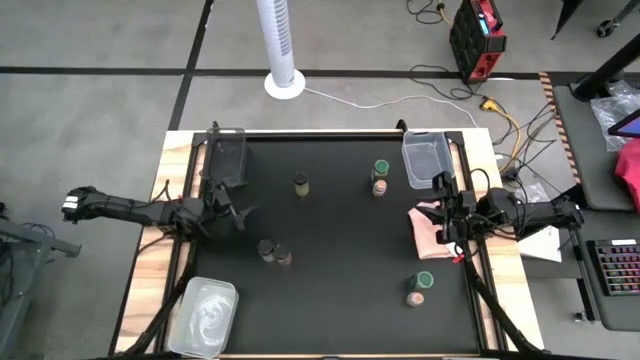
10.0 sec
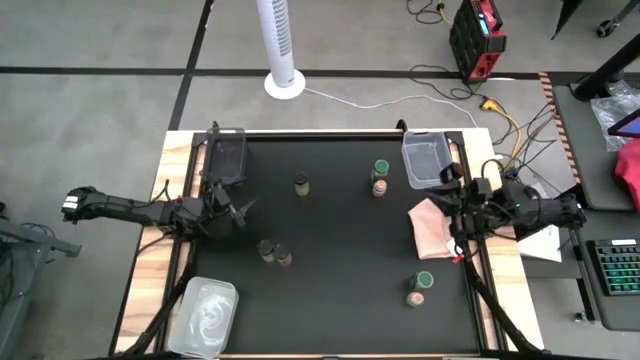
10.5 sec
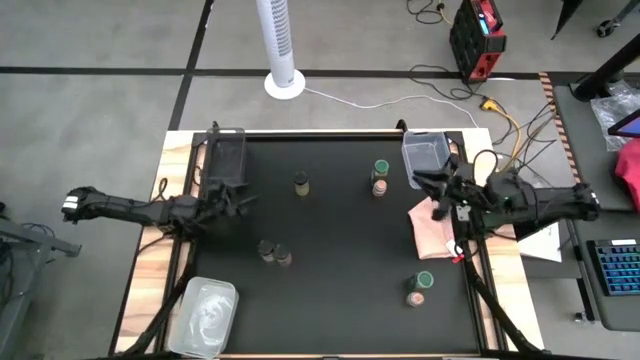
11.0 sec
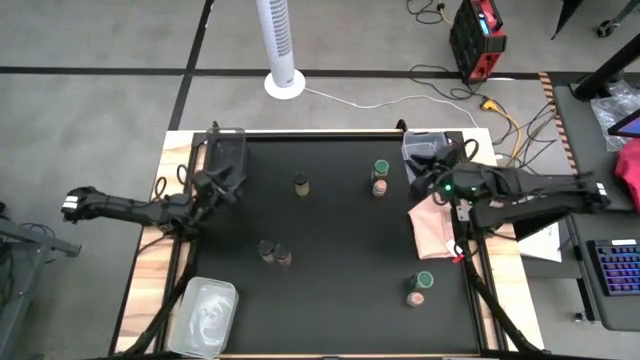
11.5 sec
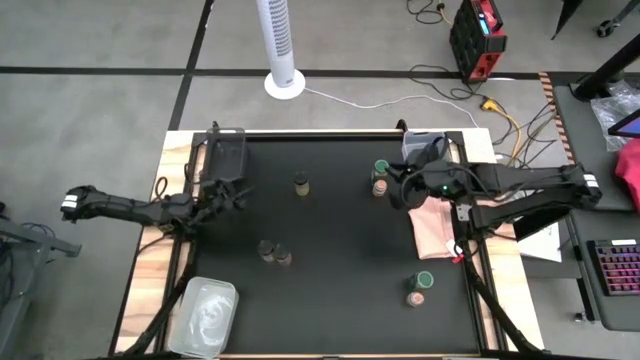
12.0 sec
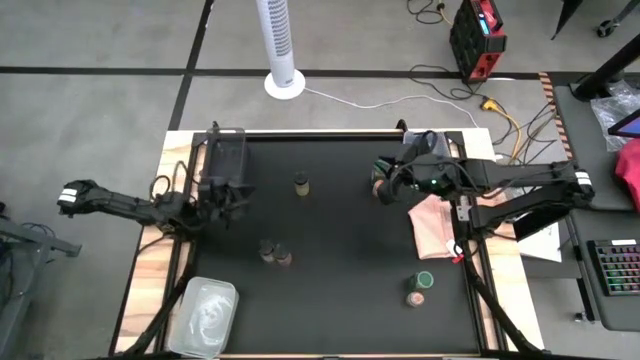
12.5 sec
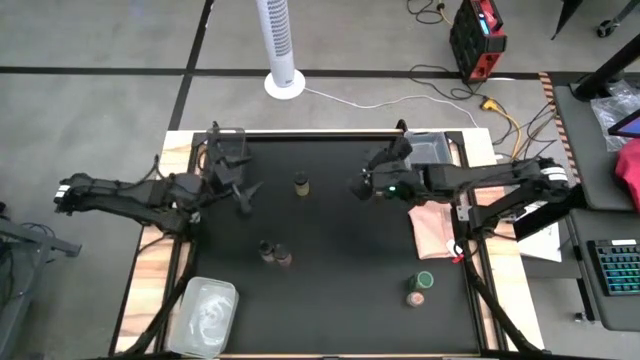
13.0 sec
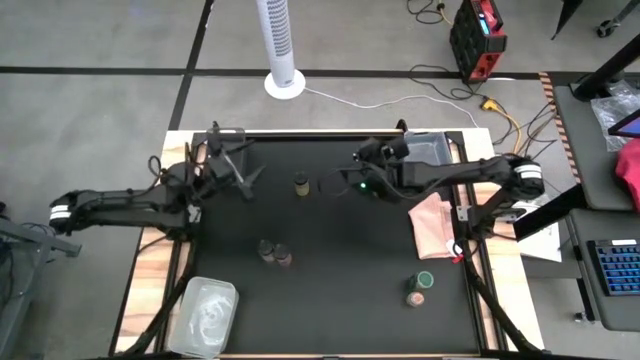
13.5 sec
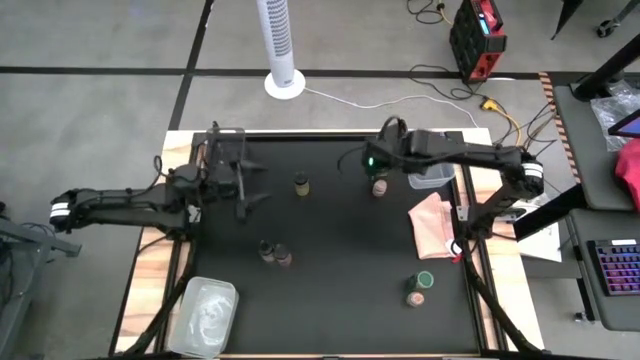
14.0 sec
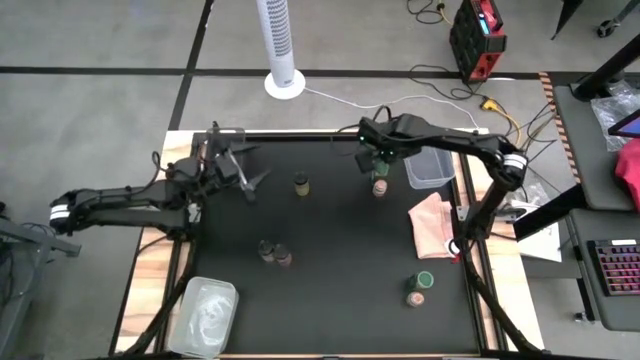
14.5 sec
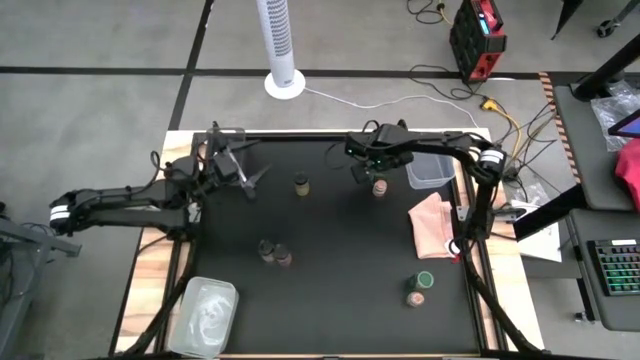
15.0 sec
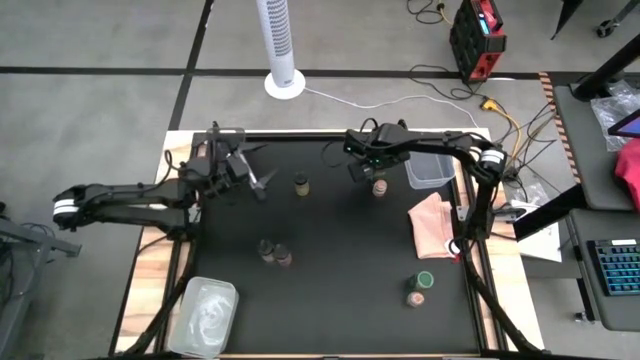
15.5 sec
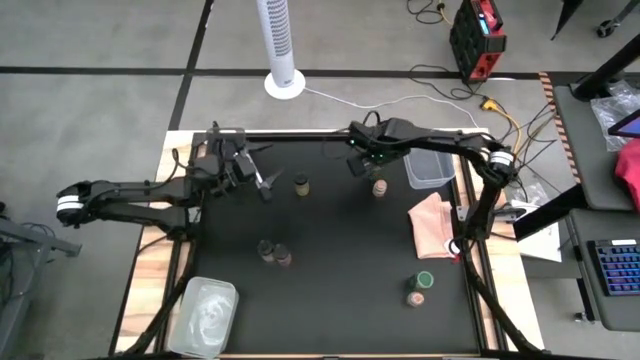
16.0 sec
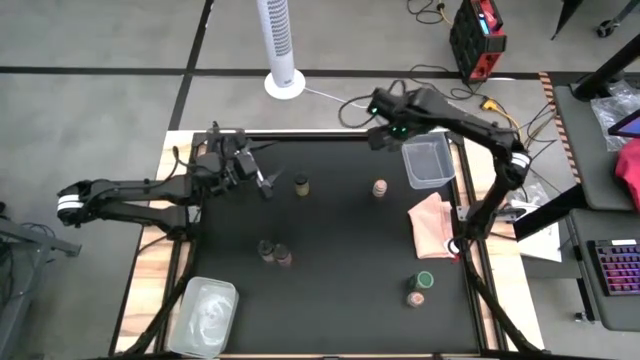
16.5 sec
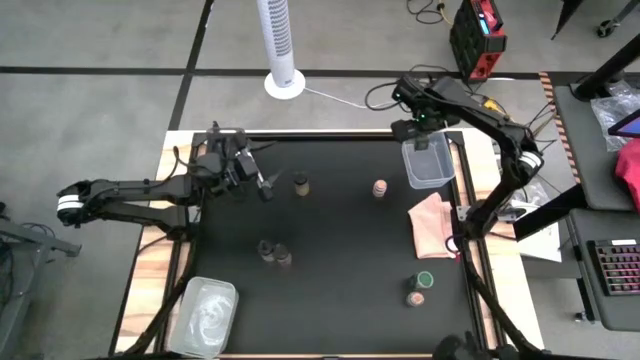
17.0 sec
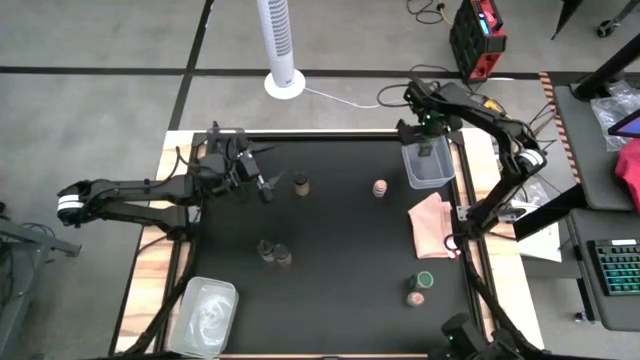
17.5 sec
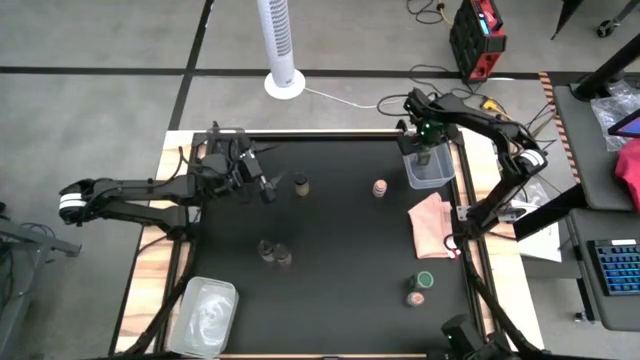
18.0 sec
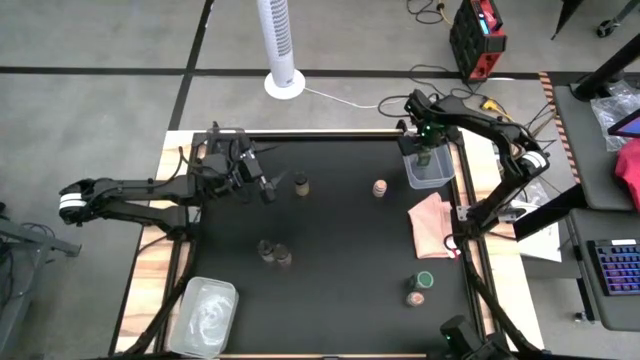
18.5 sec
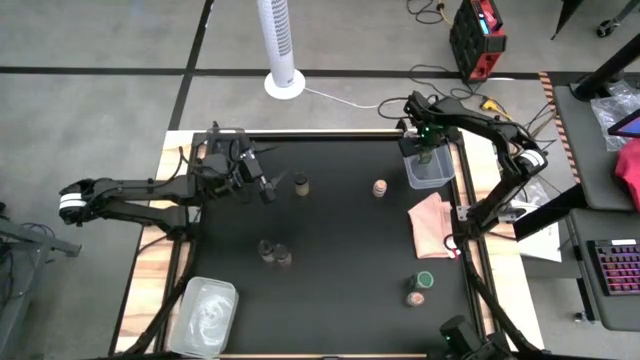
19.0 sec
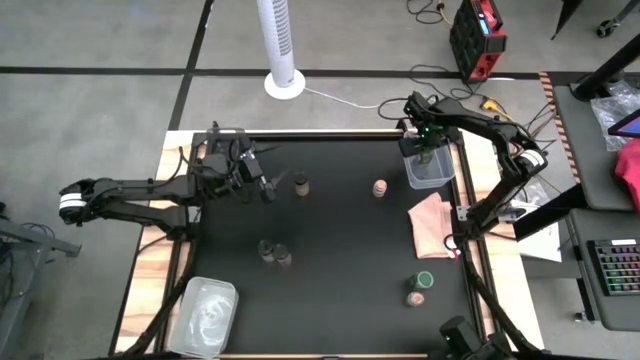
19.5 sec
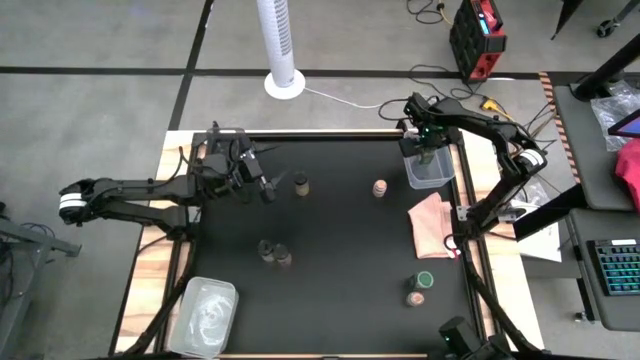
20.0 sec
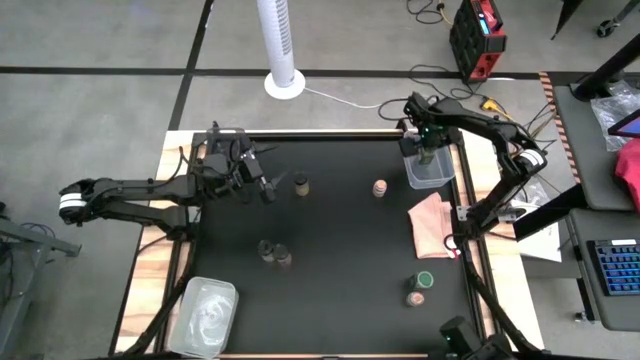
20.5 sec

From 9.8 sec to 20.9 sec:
Task: Sort spices by type
Put the top green spice bottle into the transparent bin

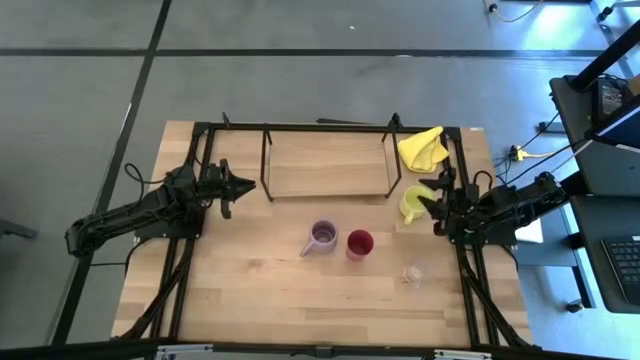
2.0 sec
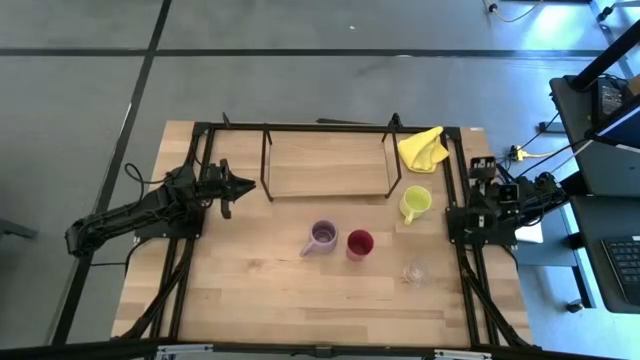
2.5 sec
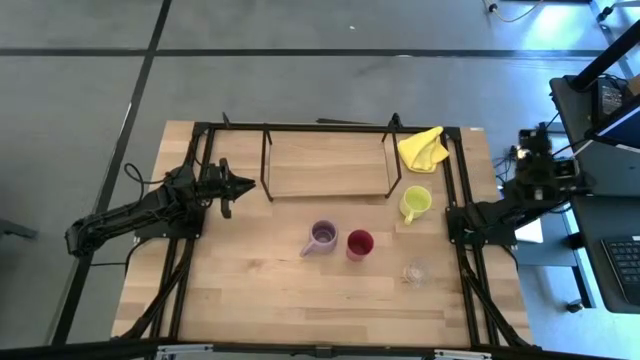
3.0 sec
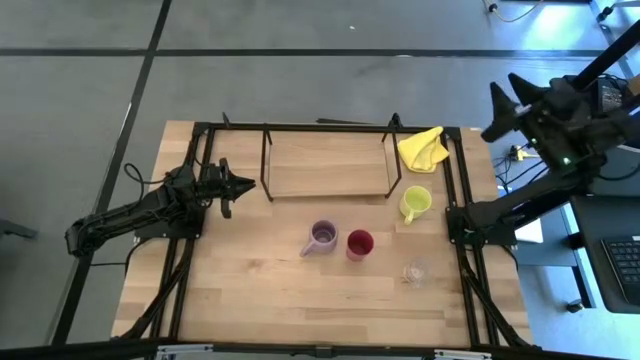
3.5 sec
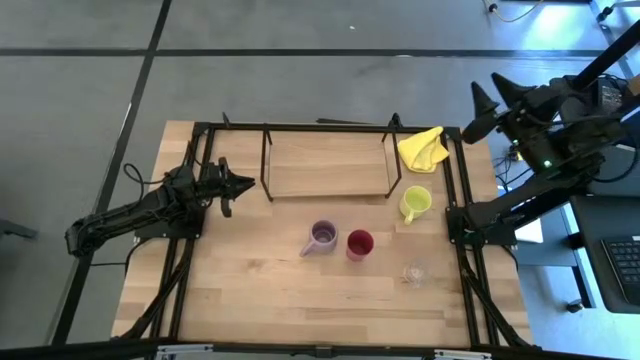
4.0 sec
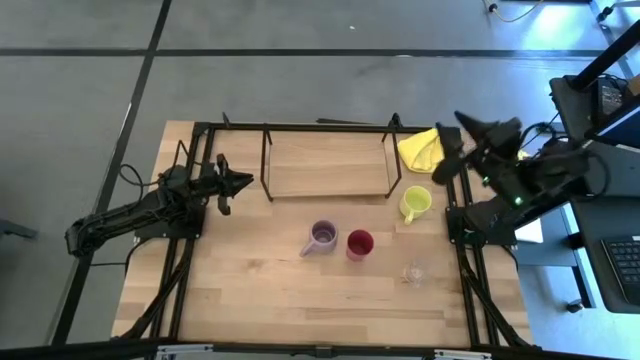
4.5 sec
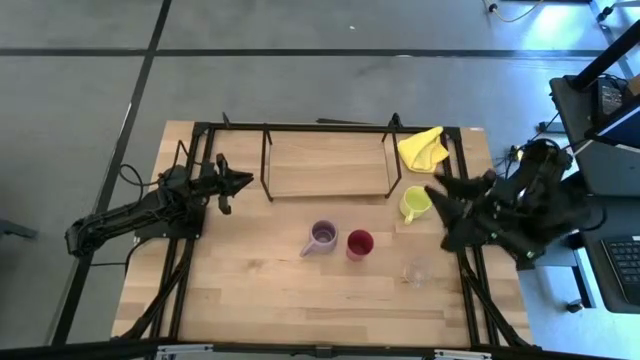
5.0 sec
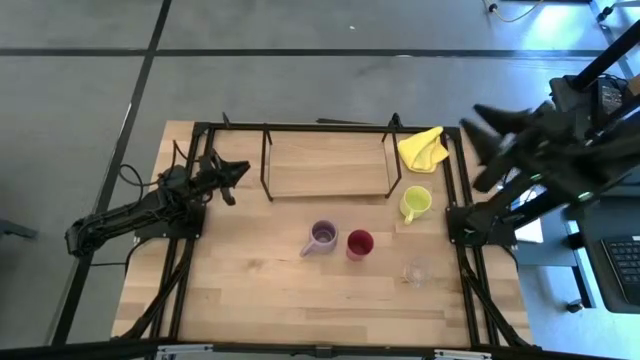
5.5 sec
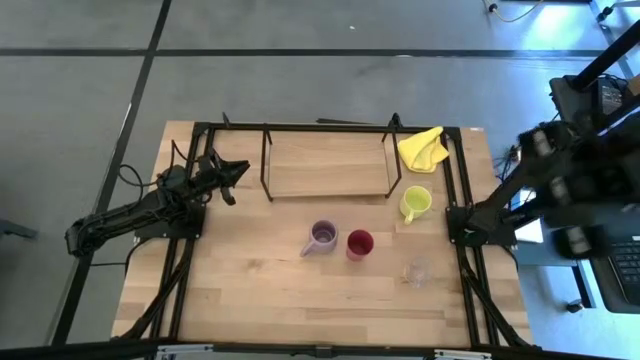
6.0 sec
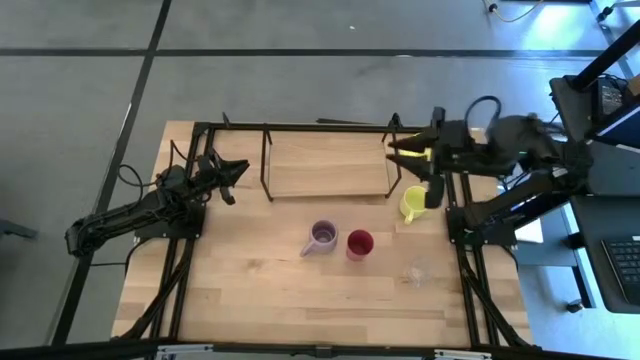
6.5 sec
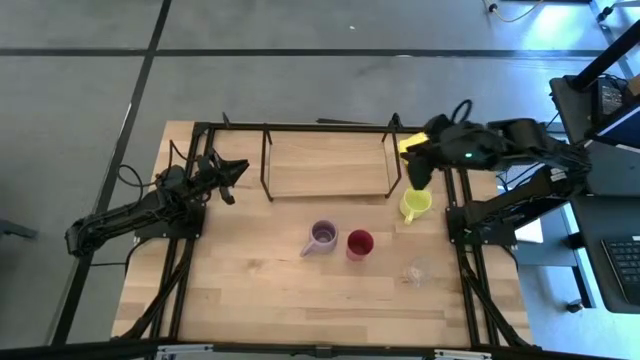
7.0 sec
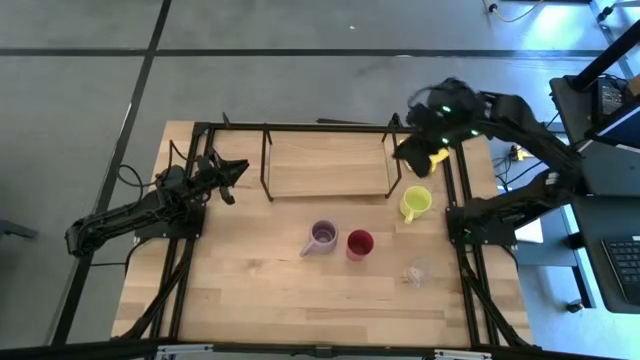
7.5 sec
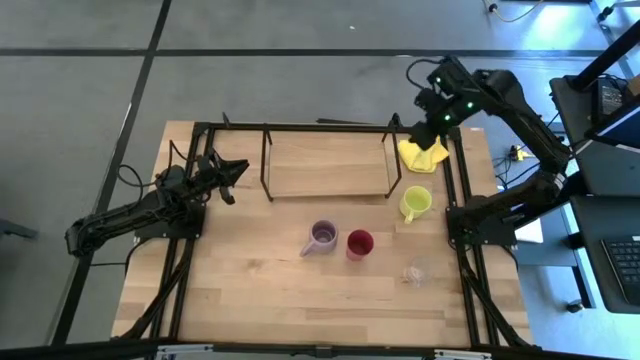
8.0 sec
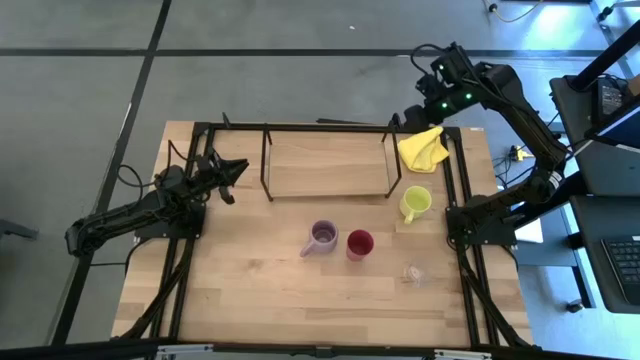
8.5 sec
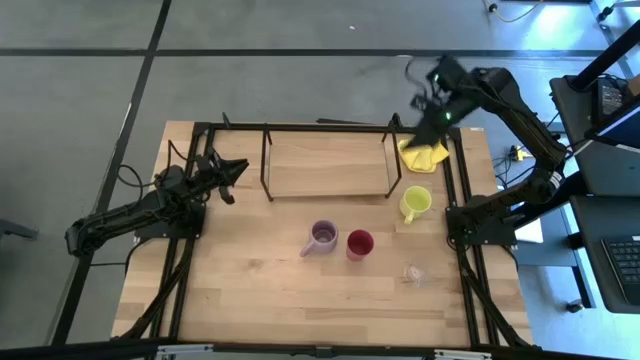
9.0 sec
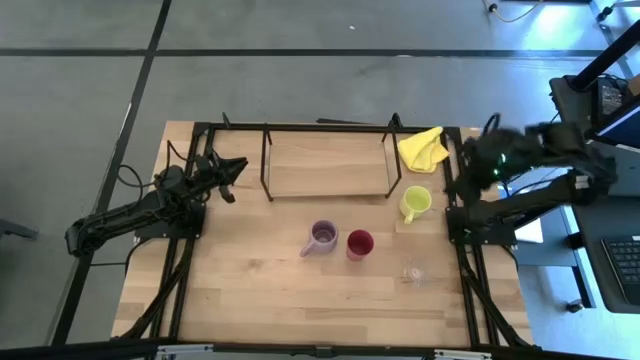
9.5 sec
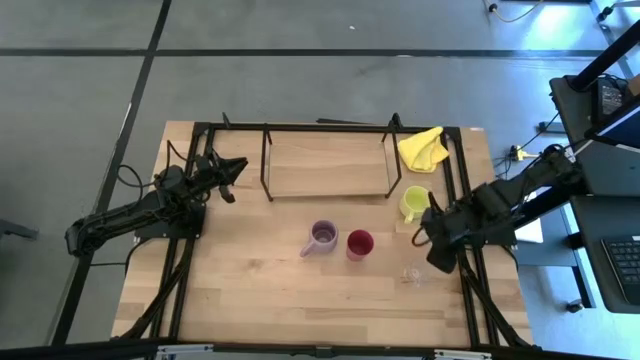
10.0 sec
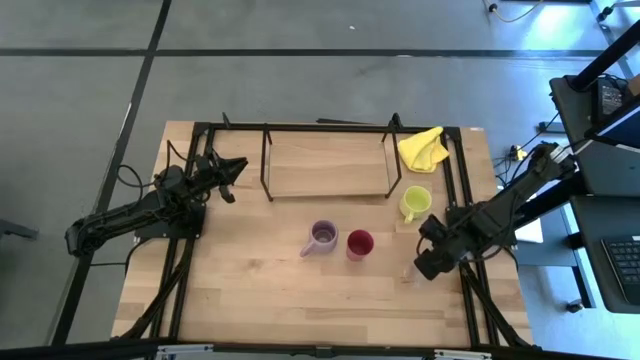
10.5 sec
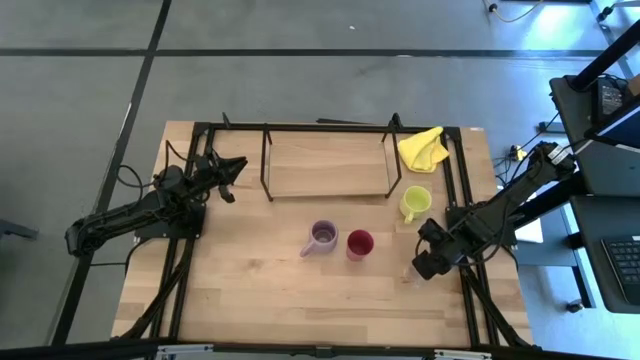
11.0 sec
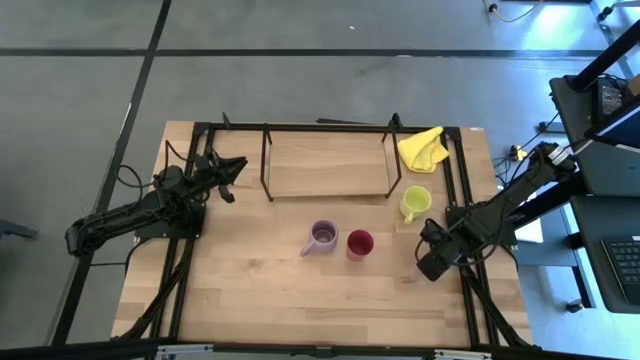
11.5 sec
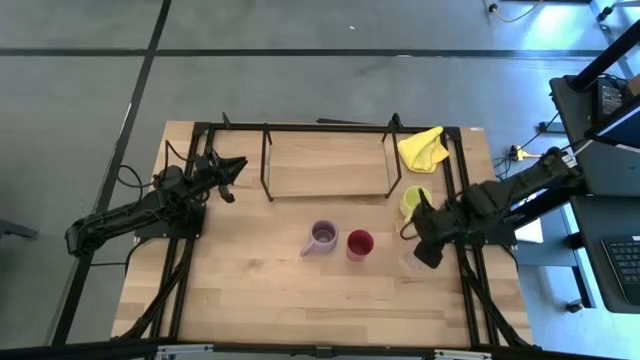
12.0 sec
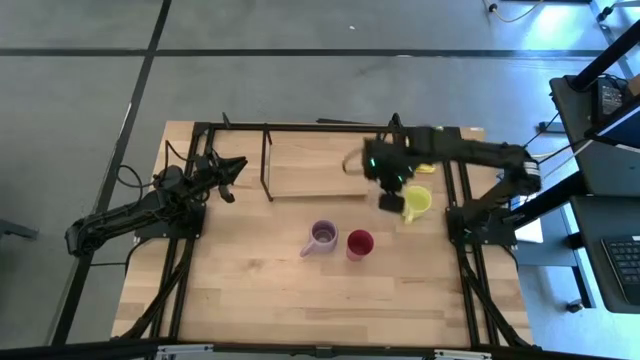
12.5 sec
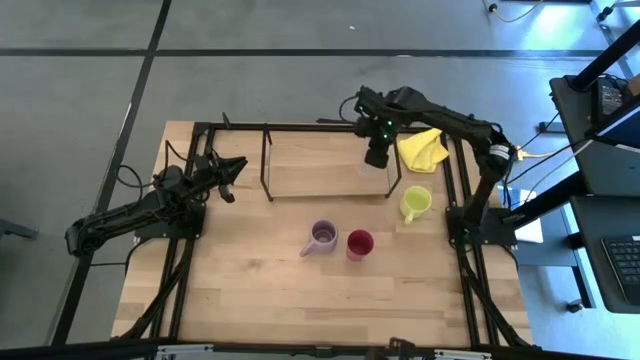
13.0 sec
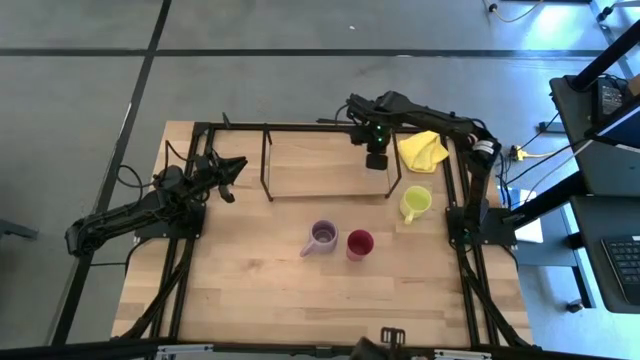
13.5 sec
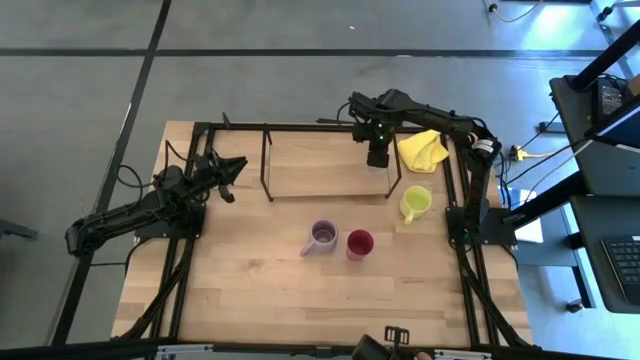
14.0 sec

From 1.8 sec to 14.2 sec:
Task: Stack small to large cups/mugs on shelf
Put the transparent cup on the shelf
